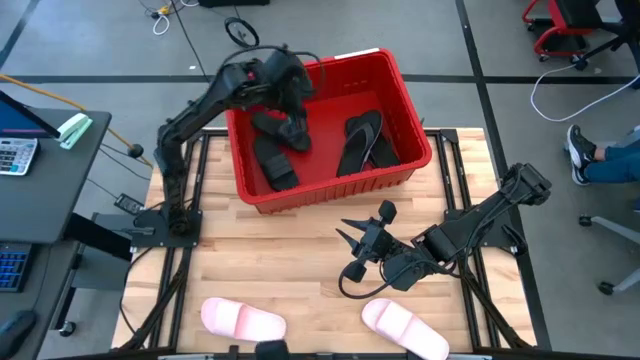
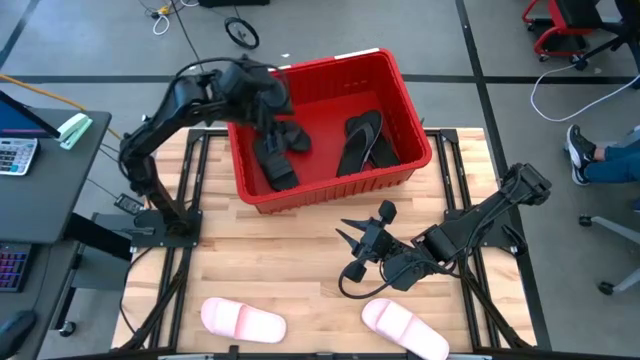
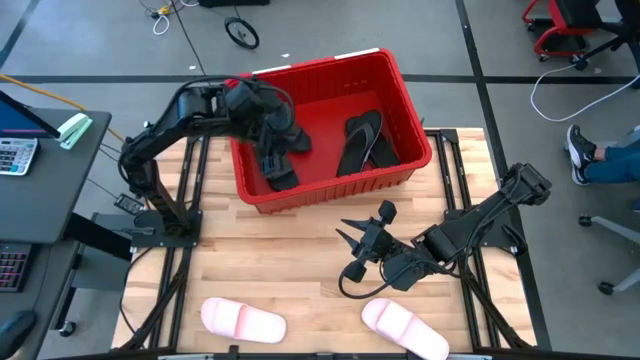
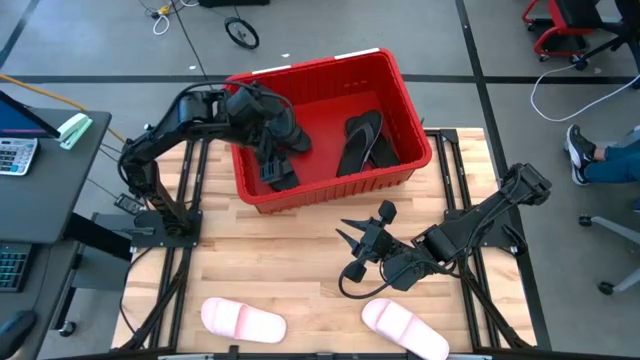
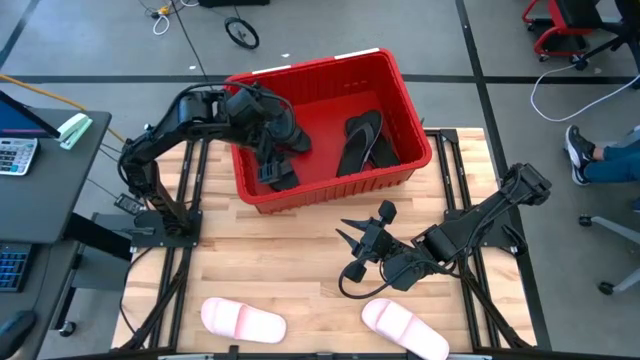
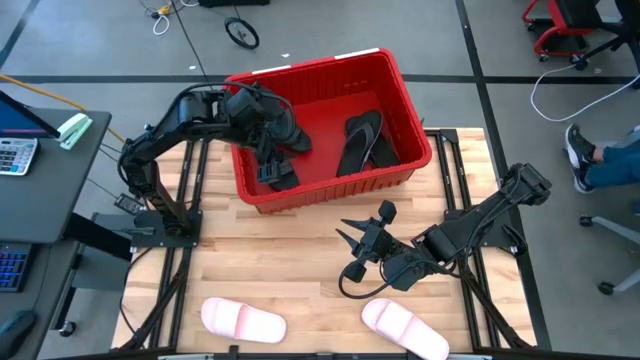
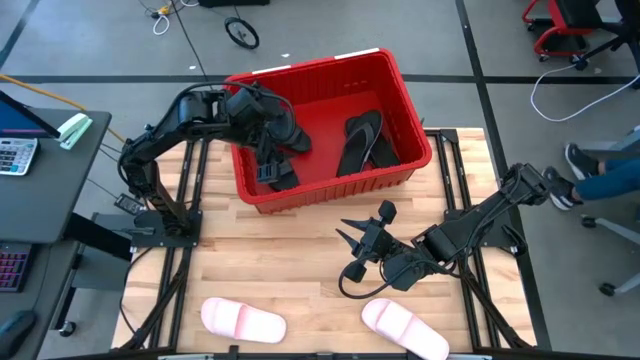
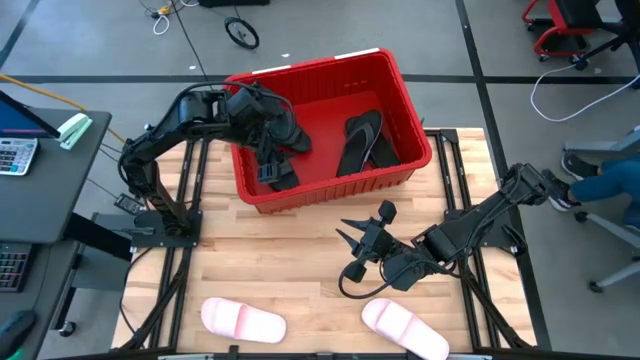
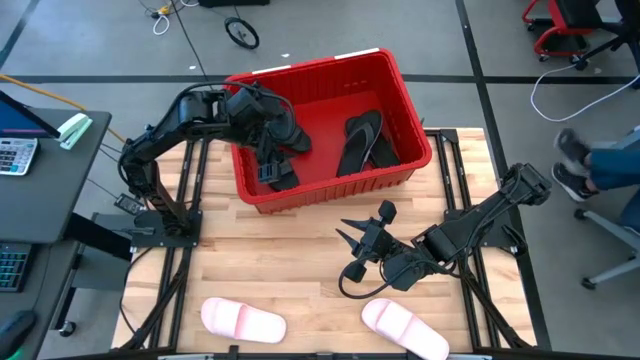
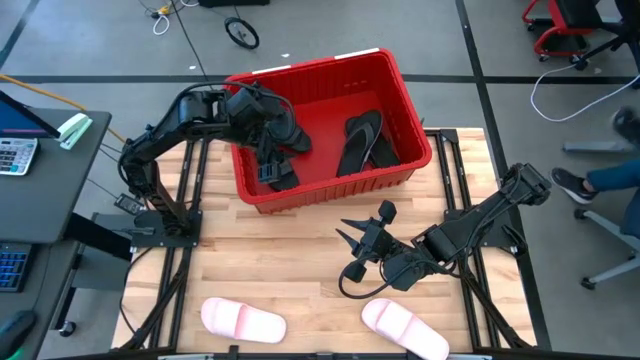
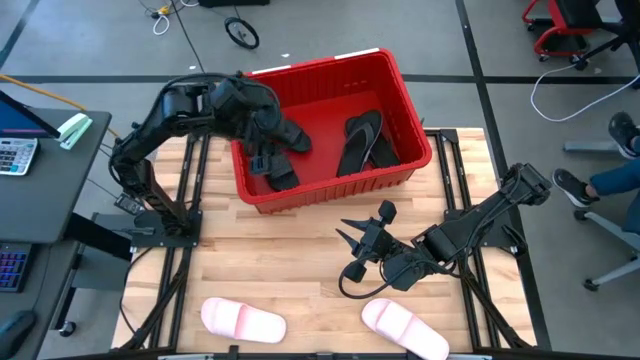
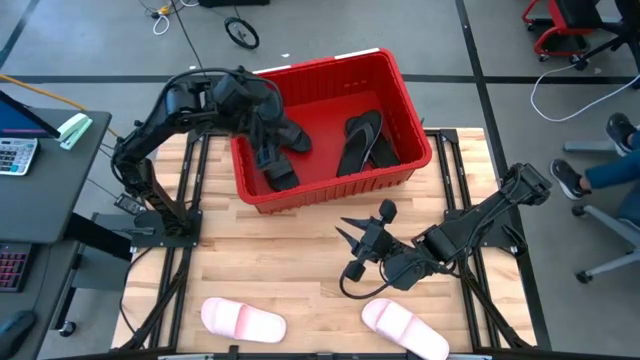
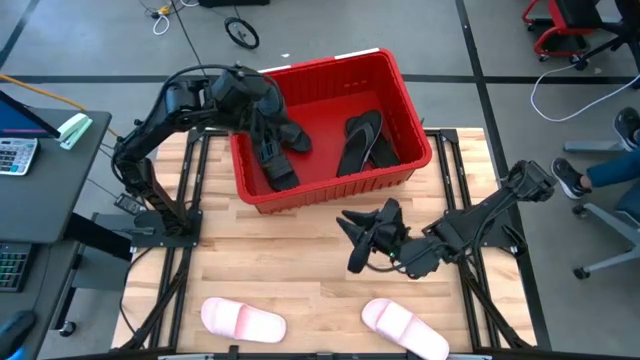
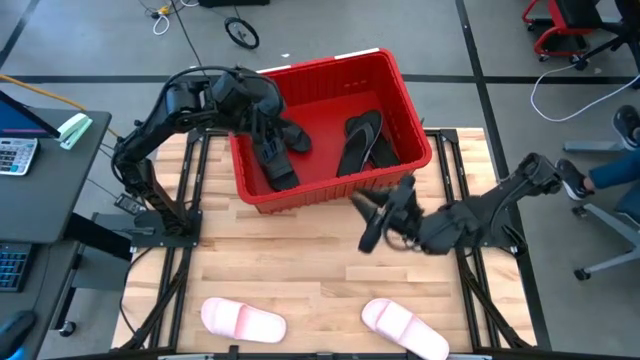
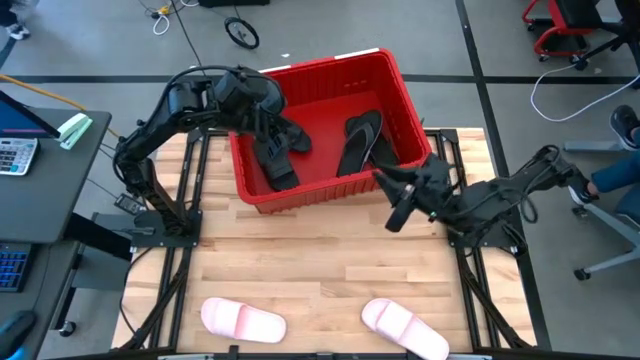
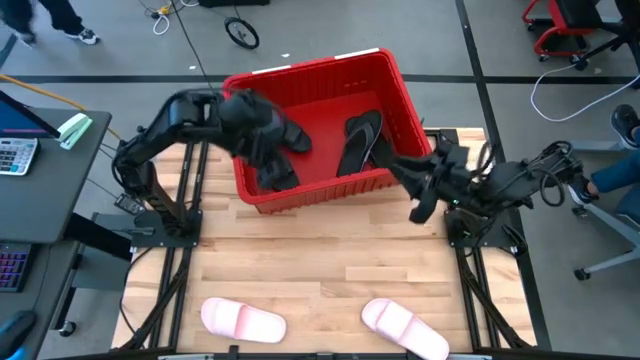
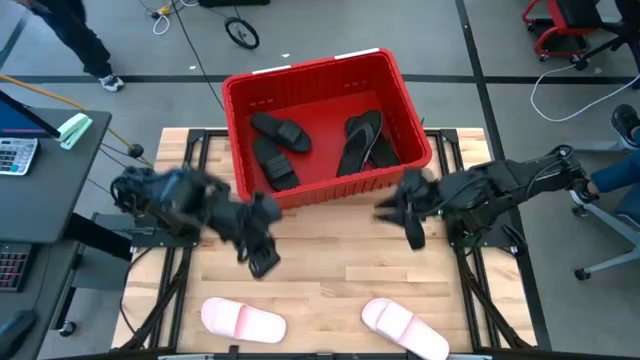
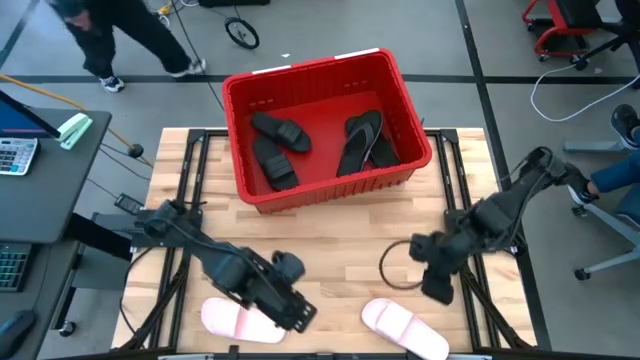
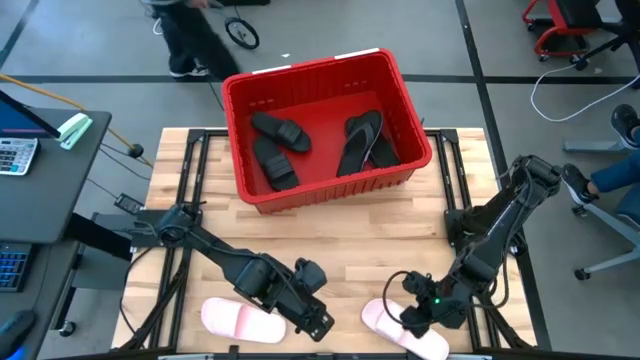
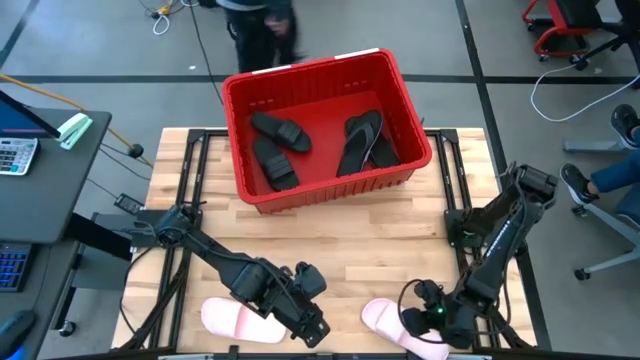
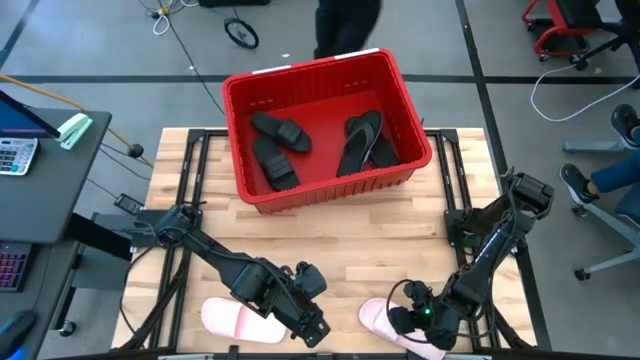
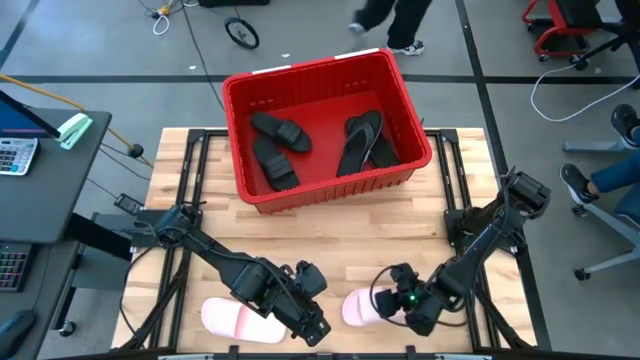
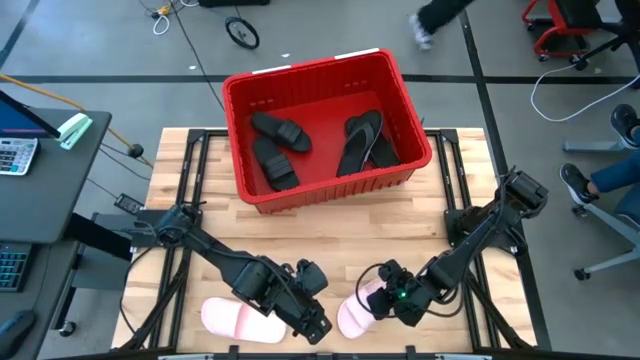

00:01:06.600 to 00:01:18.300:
Task: Pick and place slides into bin
Put the right pair of pink slides into the red container

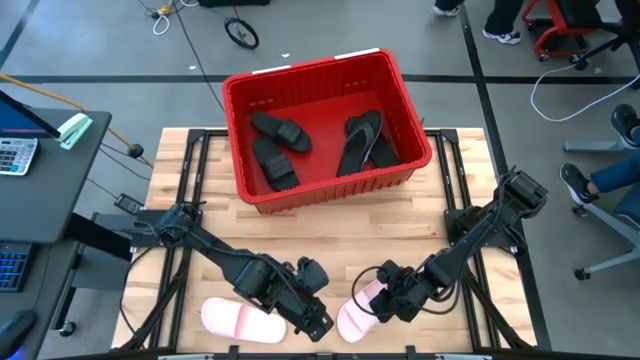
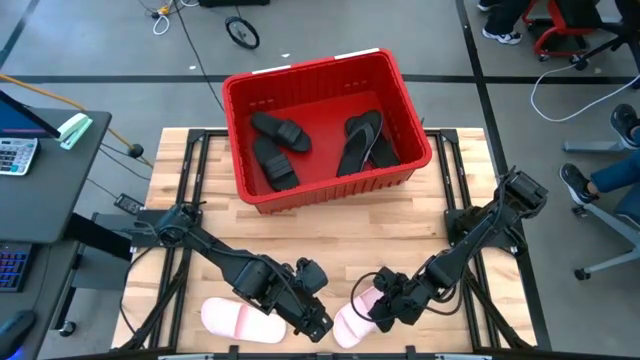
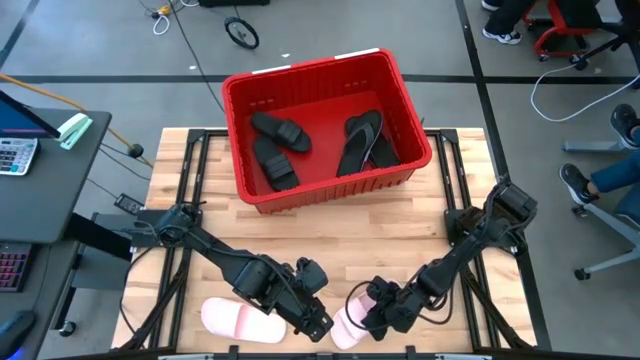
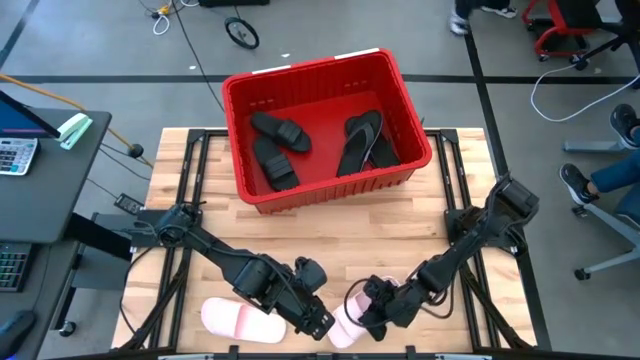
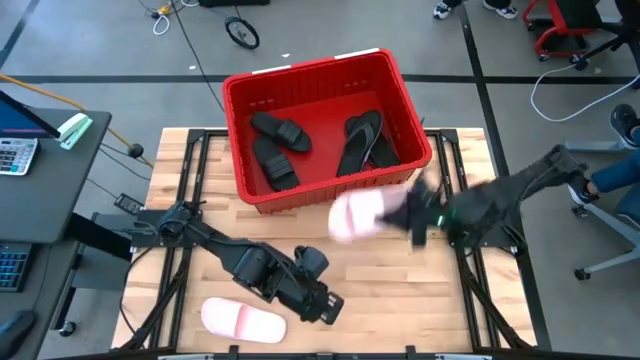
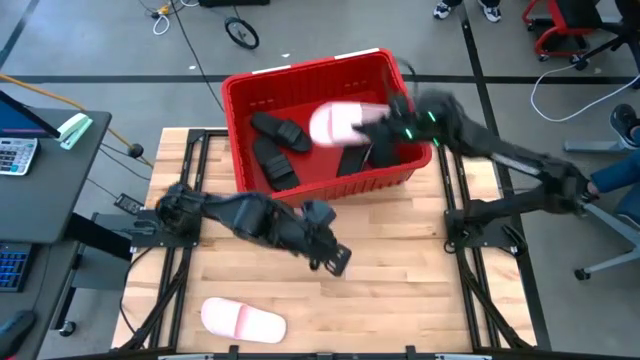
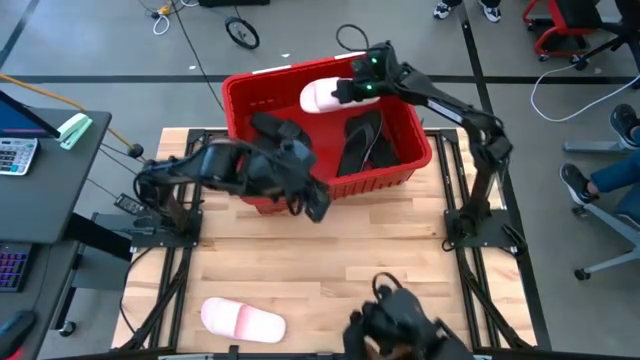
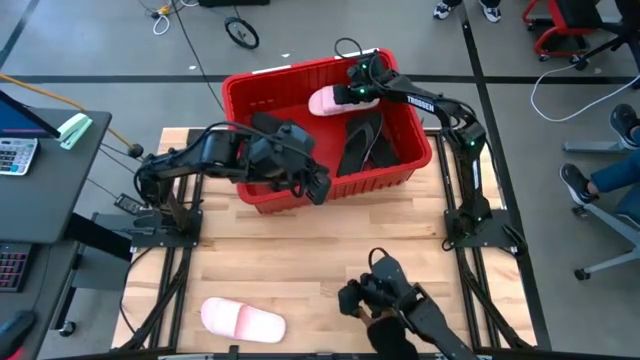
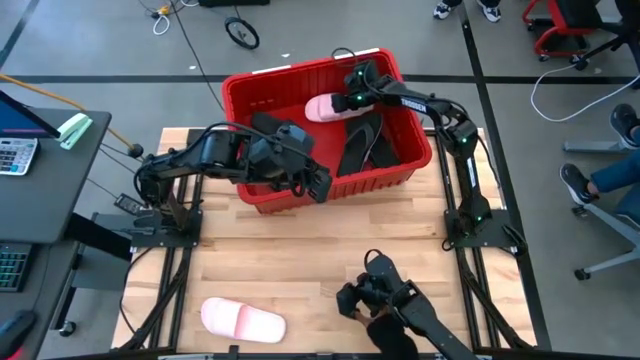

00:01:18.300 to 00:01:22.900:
Put the right pair of pink slides into the red container
